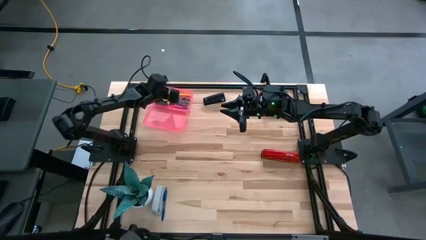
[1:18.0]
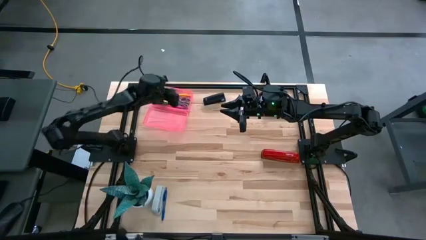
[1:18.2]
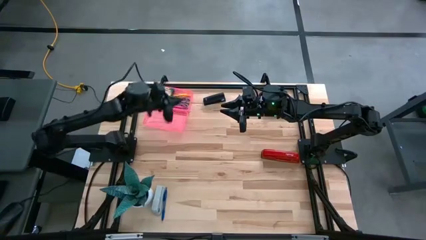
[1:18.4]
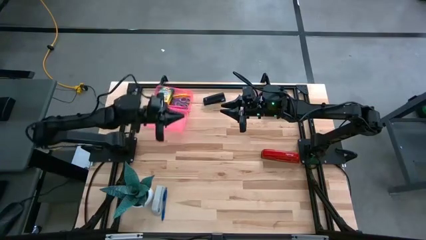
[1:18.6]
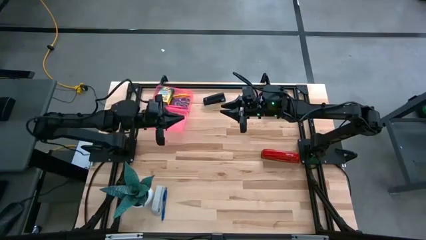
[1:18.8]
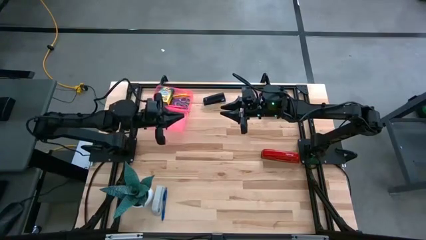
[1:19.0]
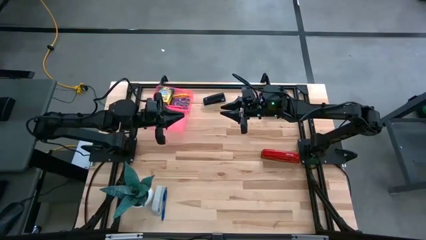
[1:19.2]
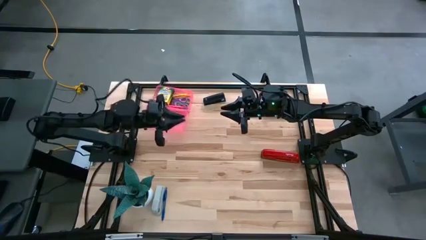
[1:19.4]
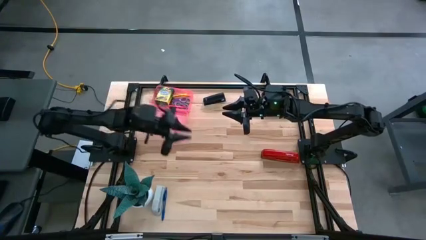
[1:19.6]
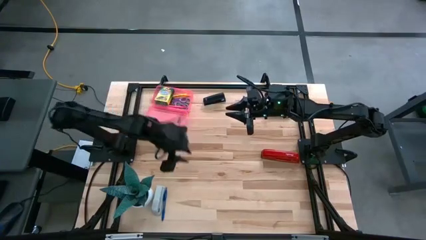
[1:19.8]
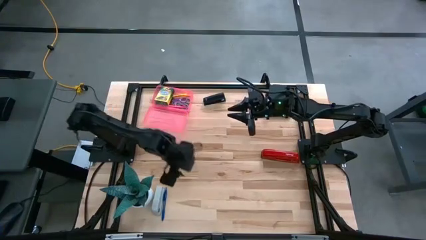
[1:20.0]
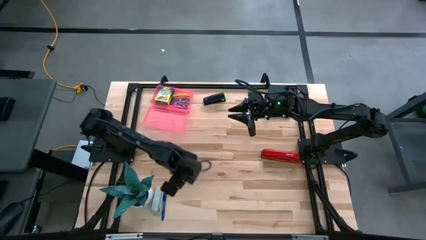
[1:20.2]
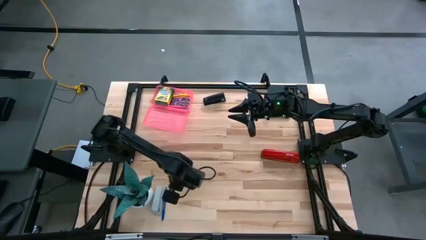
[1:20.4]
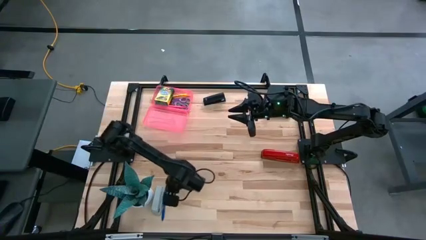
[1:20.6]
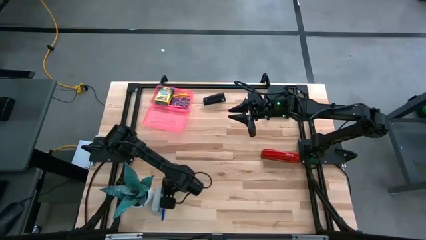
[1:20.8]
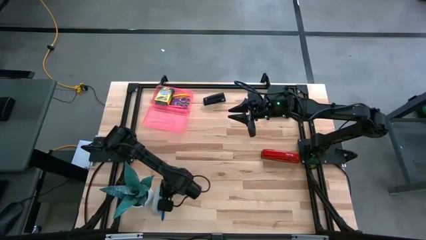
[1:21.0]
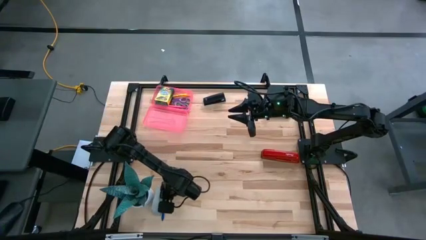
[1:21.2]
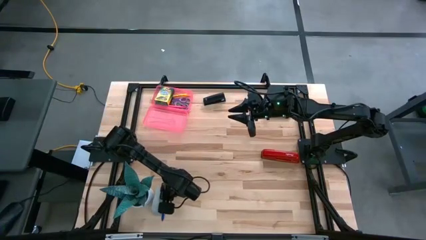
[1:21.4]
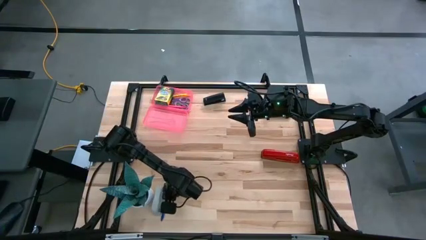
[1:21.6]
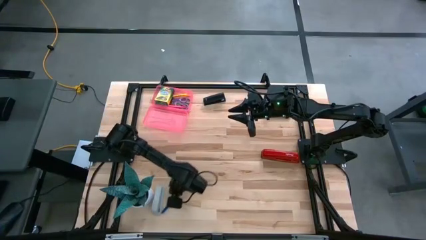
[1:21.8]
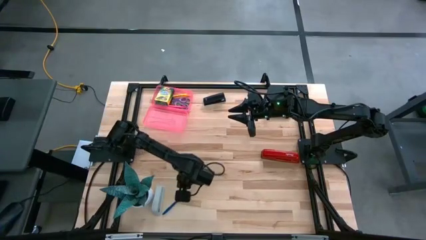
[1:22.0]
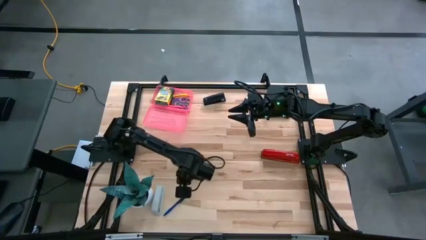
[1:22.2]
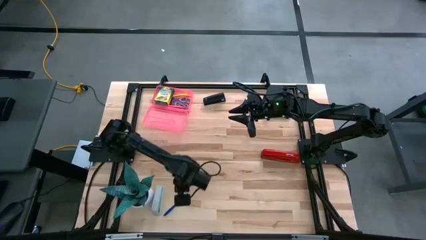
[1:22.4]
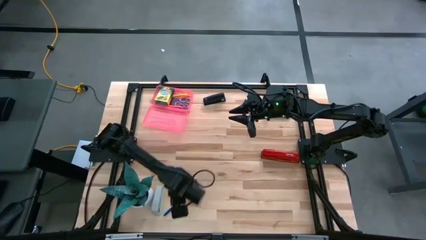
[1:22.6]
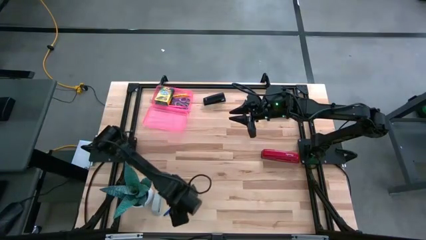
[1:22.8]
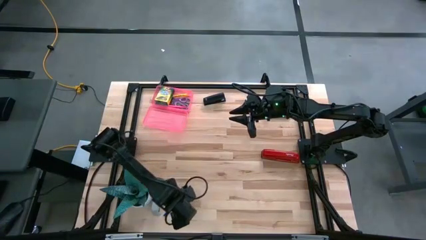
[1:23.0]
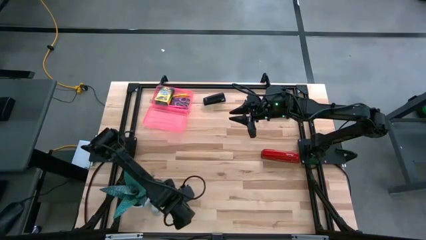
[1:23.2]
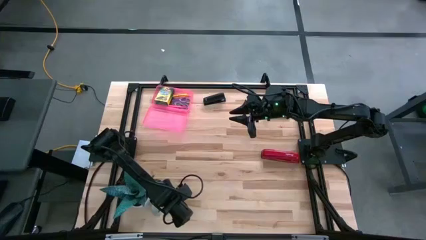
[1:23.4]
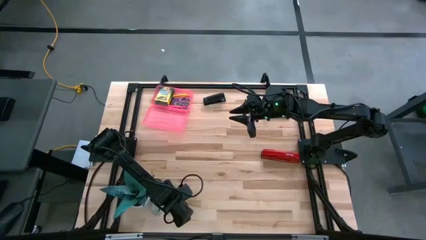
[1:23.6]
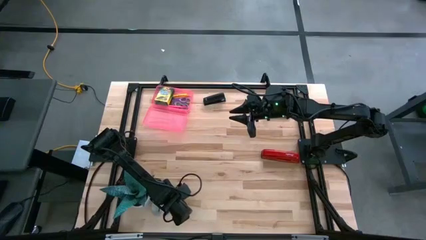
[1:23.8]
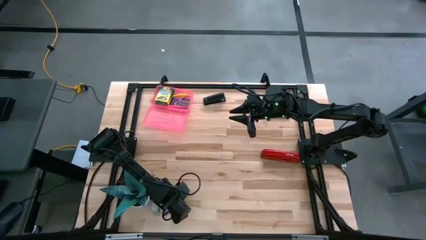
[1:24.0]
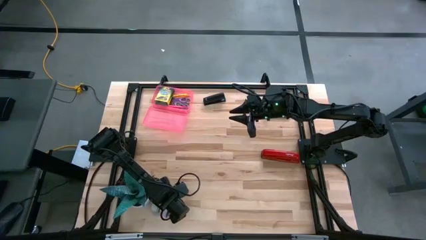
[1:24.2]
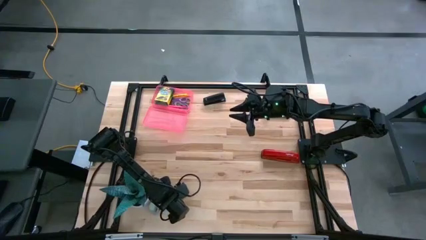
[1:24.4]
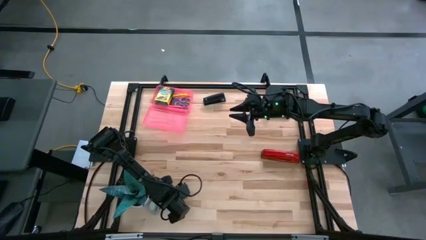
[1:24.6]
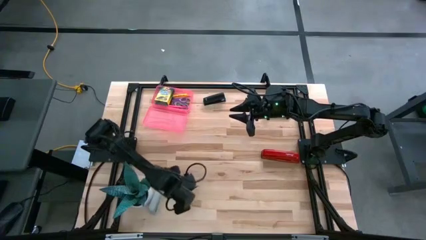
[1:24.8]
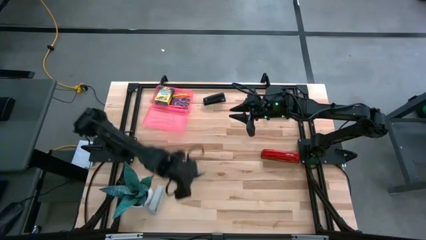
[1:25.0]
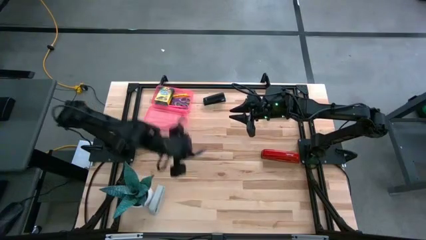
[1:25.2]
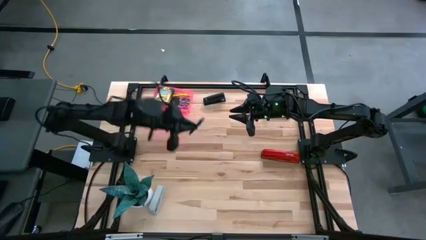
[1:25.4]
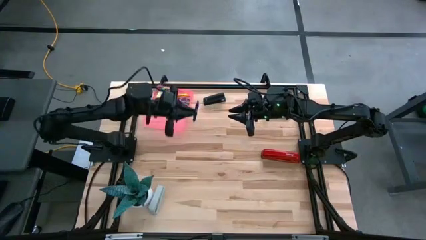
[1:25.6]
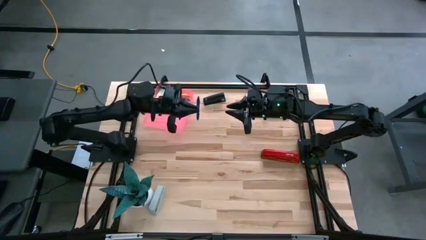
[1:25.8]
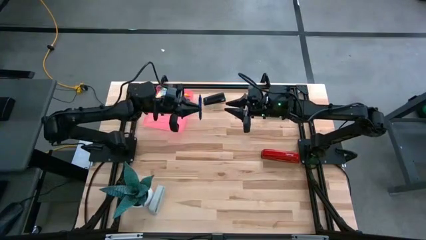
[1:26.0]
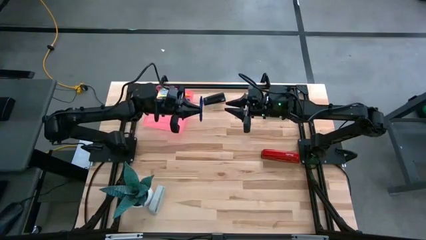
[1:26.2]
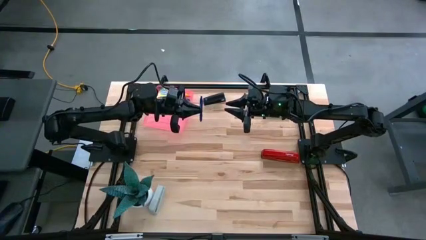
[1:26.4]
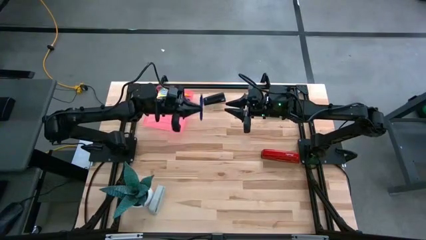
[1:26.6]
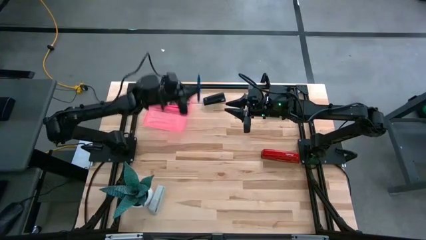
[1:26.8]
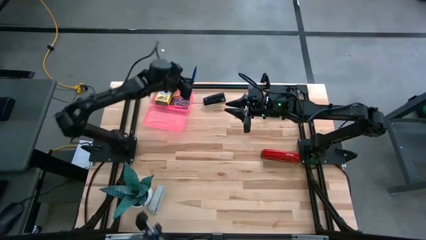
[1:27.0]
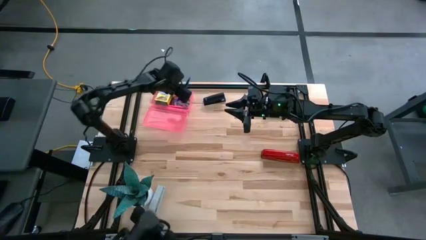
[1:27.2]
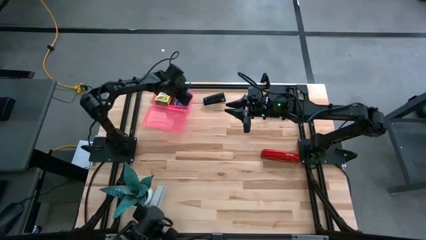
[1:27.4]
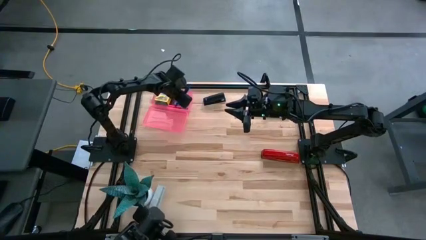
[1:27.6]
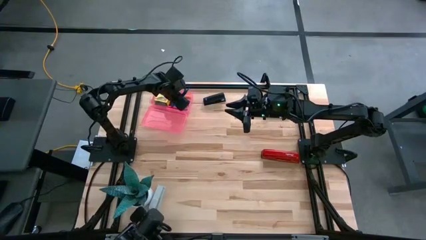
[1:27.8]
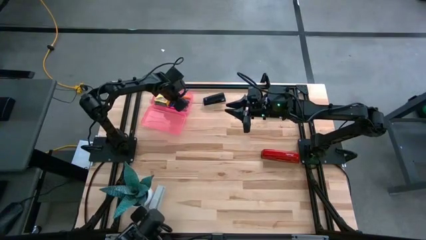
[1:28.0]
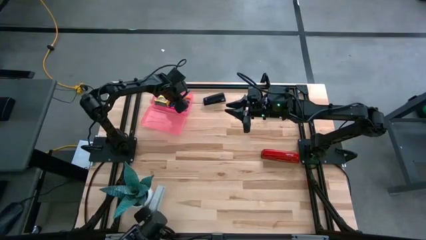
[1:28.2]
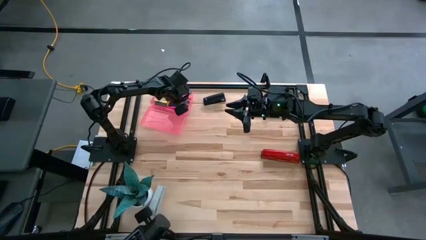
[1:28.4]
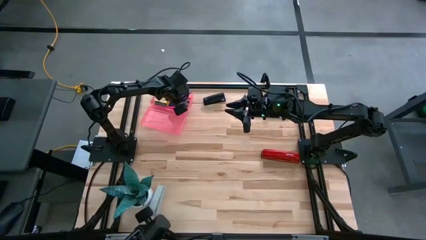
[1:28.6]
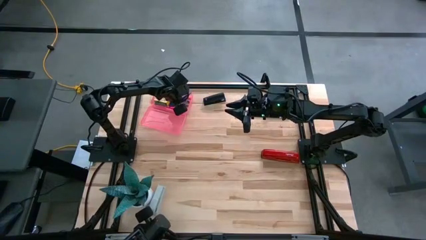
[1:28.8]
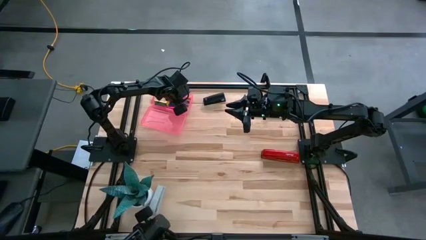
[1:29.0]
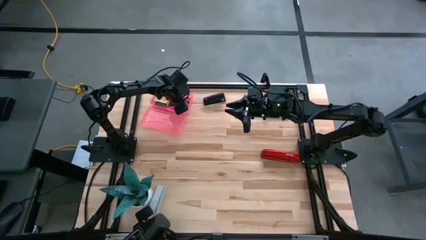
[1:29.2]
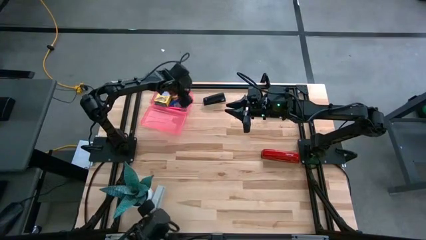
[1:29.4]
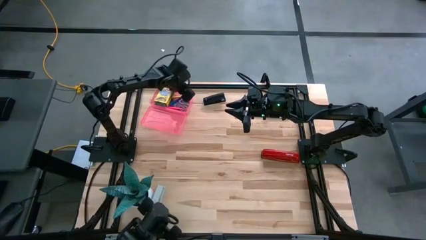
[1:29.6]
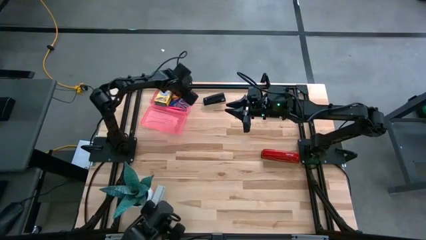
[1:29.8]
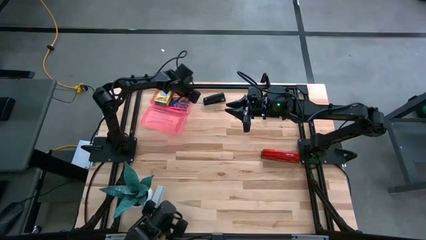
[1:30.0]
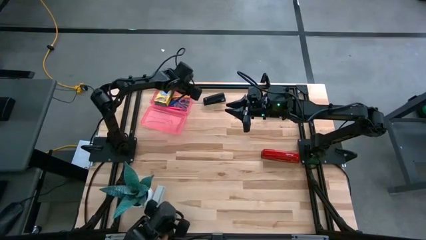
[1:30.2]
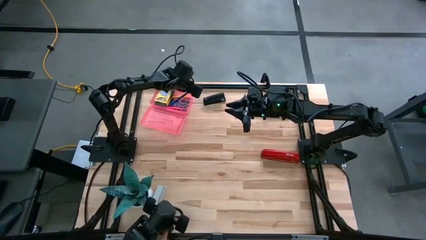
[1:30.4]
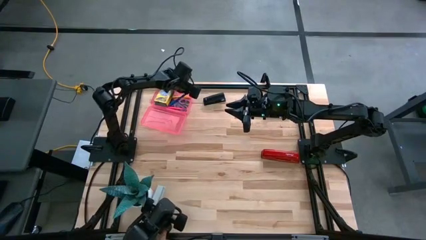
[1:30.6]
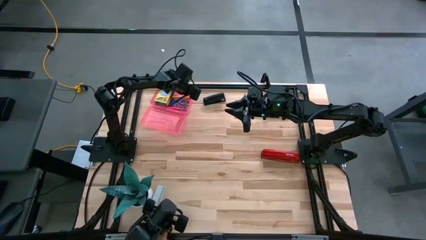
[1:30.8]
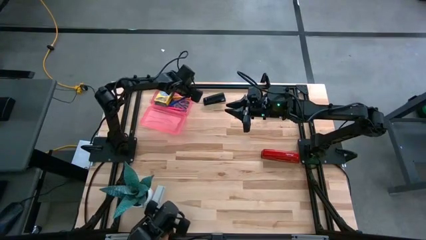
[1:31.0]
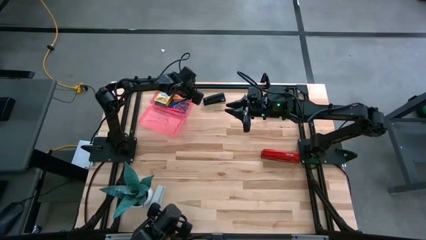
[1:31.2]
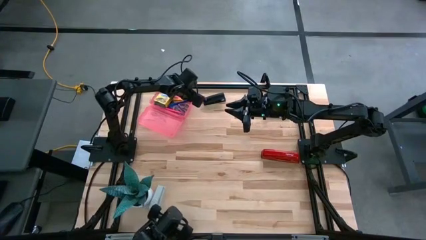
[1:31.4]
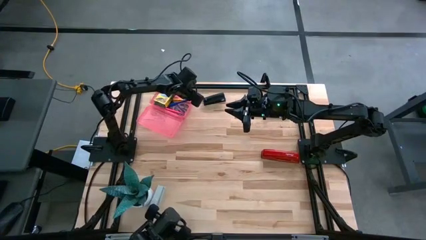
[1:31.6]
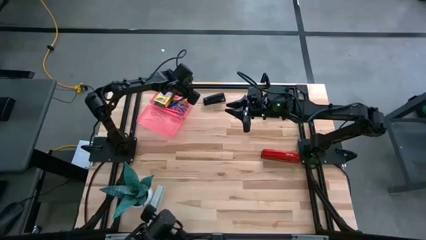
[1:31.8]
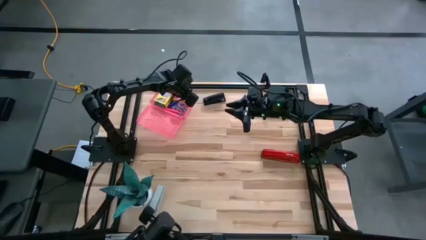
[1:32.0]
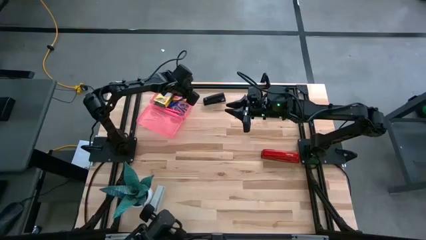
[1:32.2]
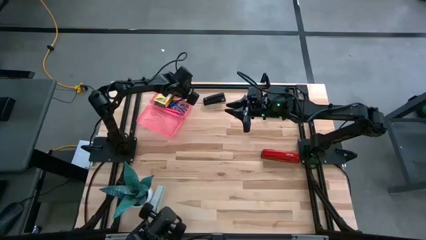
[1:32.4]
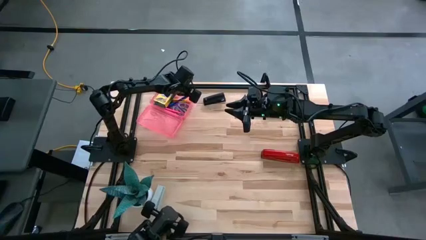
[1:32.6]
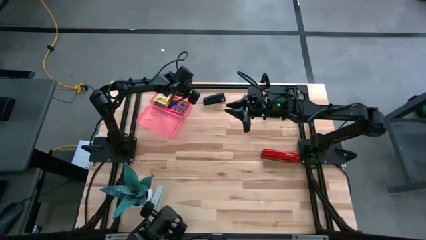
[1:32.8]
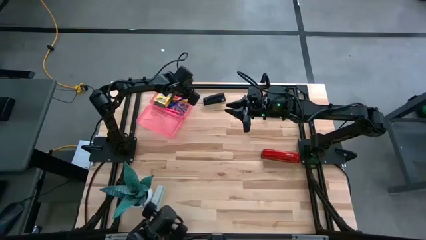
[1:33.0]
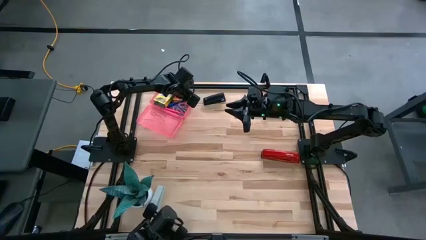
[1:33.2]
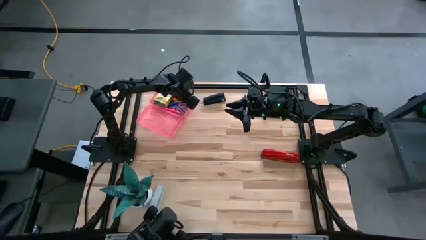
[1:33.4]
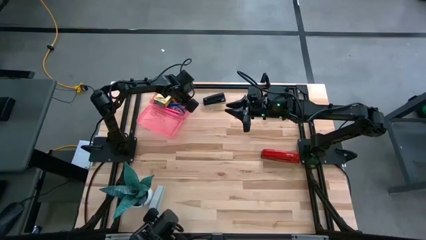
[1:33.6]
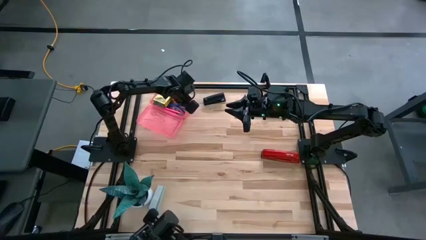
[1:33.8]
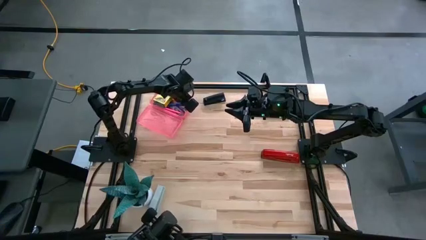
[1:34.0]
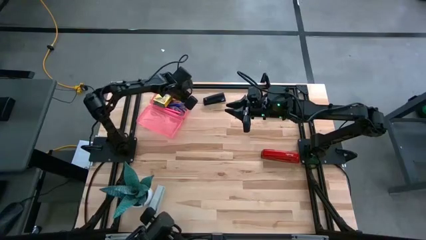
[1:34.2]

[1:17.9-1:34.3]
Task: Pack school essentials
Put the blue pen into the pink supply box
